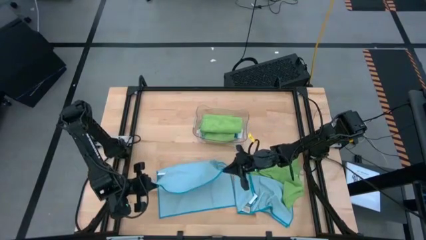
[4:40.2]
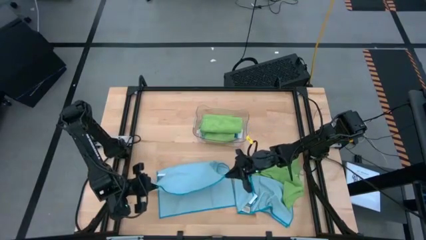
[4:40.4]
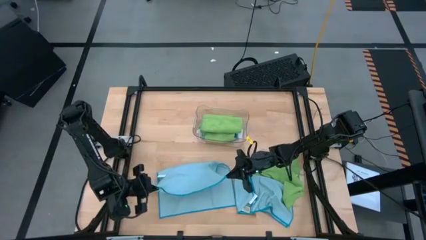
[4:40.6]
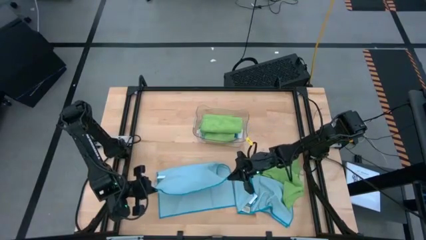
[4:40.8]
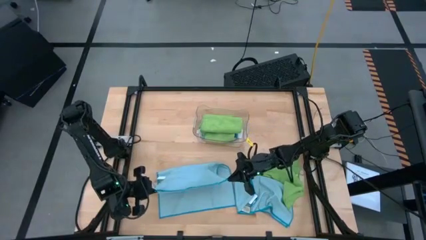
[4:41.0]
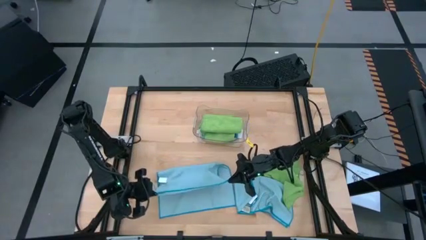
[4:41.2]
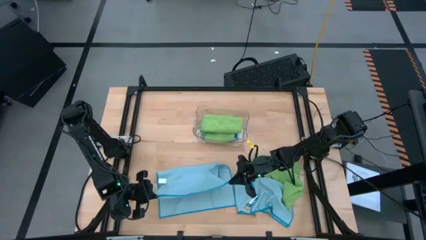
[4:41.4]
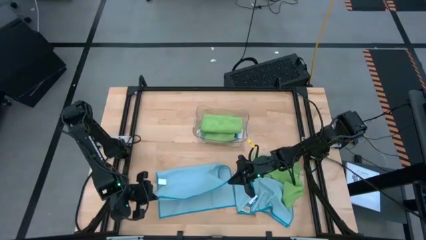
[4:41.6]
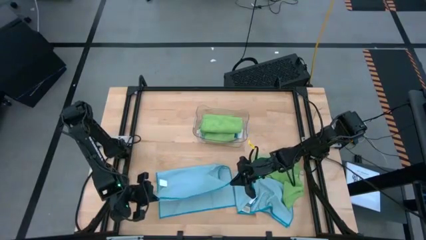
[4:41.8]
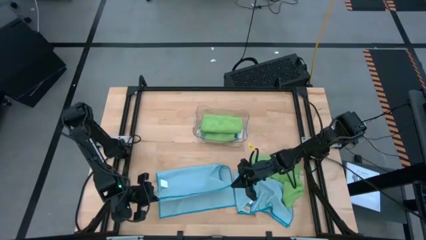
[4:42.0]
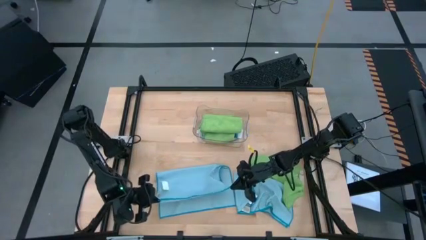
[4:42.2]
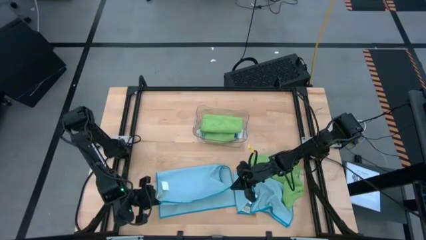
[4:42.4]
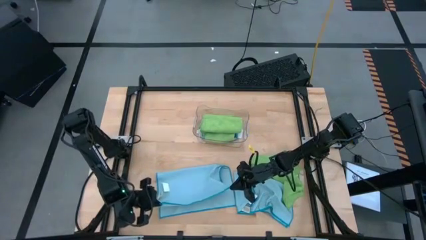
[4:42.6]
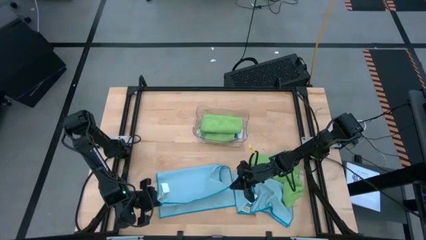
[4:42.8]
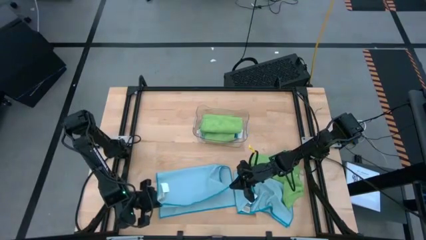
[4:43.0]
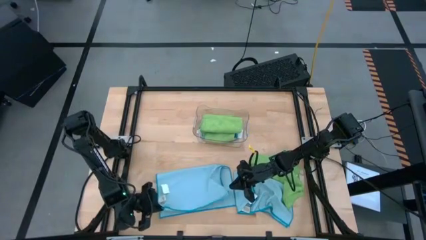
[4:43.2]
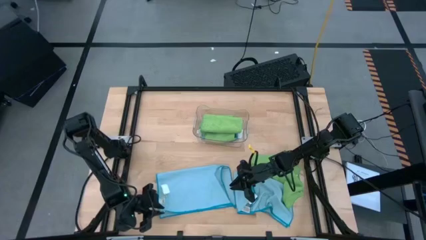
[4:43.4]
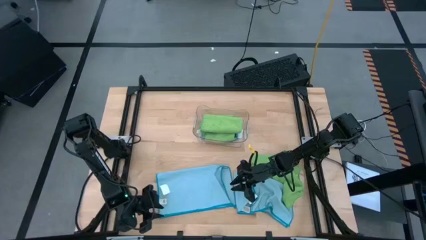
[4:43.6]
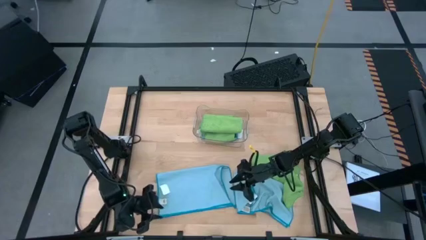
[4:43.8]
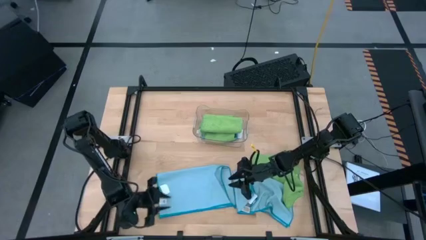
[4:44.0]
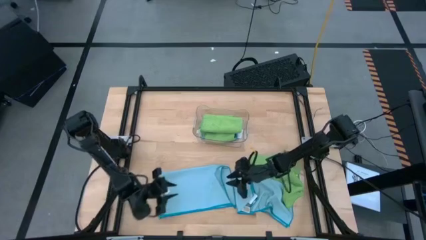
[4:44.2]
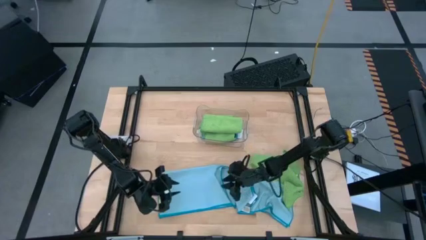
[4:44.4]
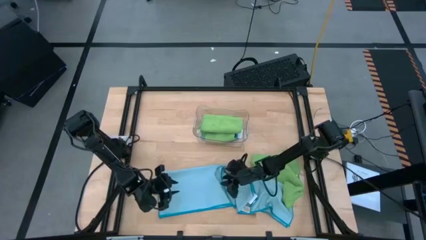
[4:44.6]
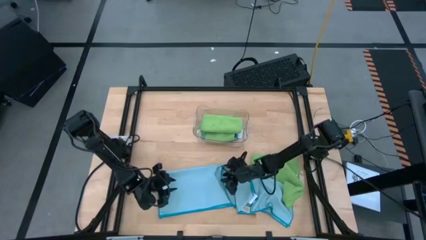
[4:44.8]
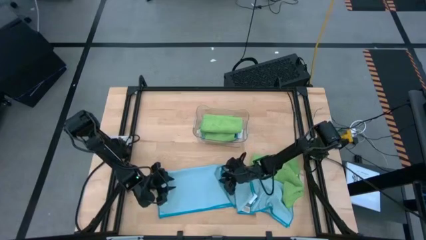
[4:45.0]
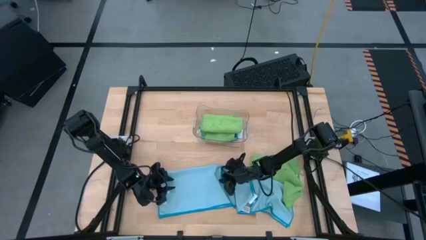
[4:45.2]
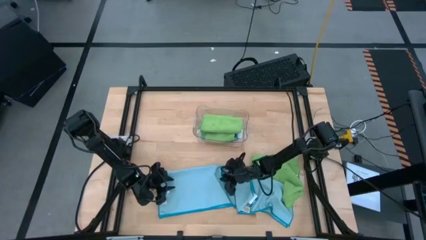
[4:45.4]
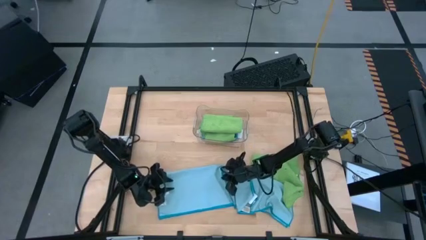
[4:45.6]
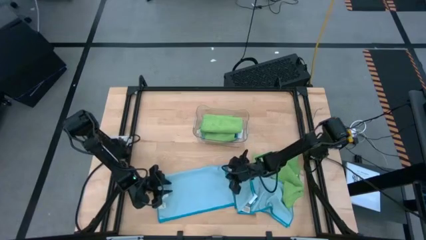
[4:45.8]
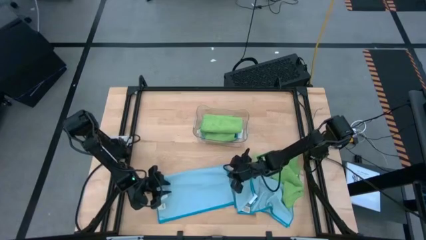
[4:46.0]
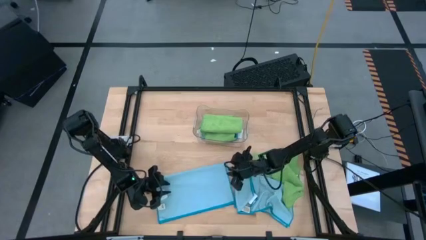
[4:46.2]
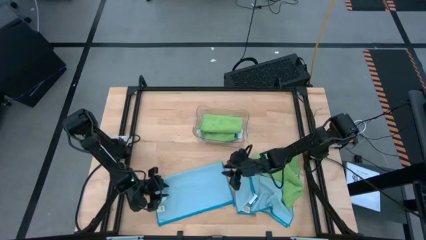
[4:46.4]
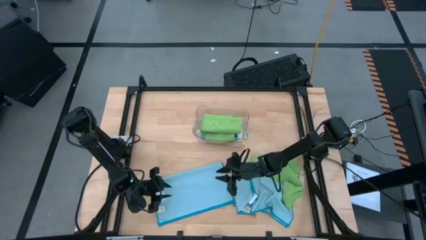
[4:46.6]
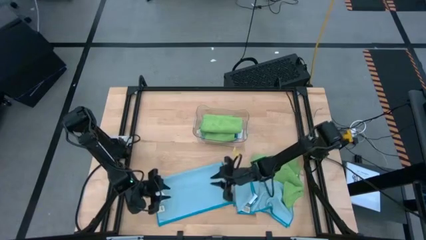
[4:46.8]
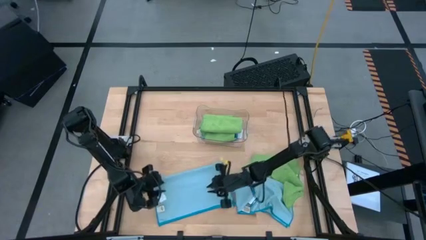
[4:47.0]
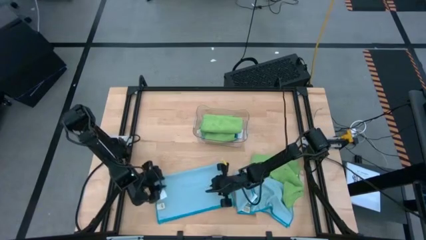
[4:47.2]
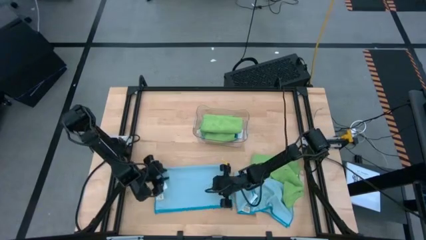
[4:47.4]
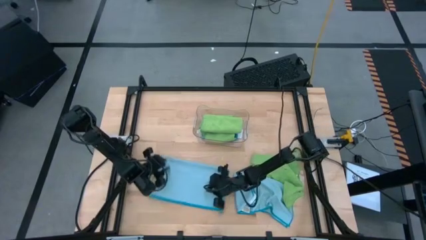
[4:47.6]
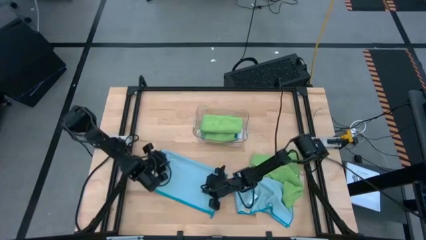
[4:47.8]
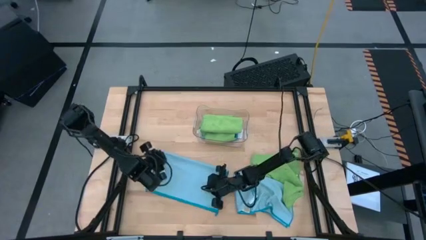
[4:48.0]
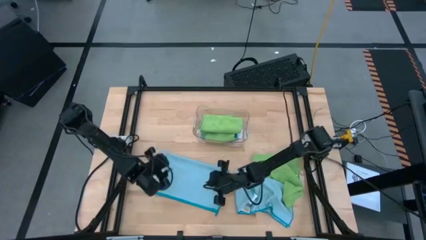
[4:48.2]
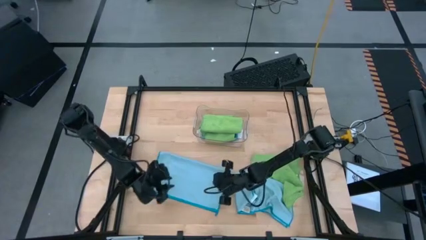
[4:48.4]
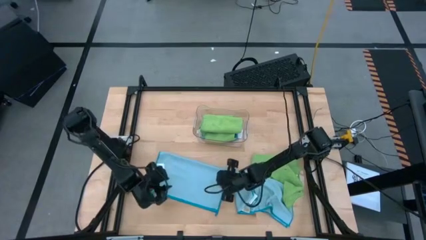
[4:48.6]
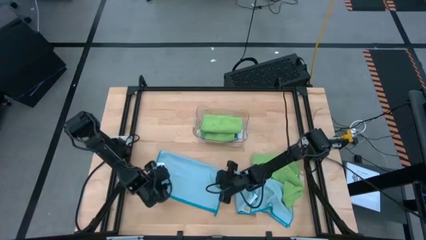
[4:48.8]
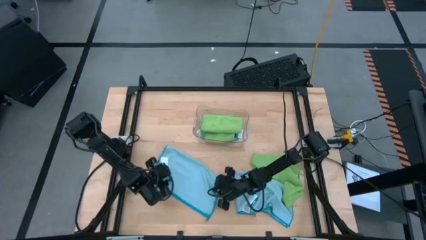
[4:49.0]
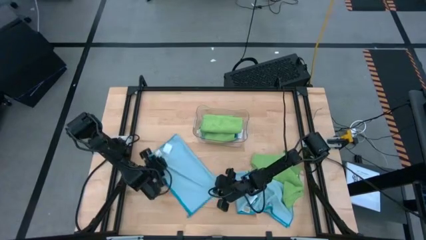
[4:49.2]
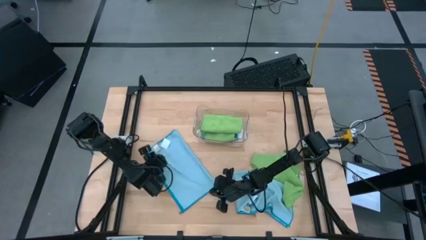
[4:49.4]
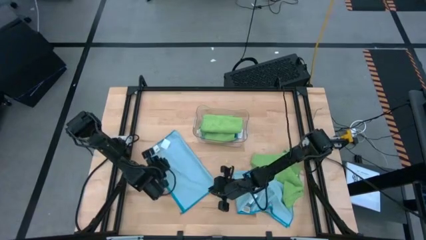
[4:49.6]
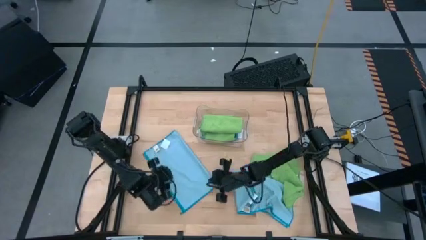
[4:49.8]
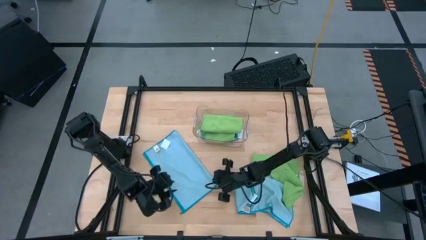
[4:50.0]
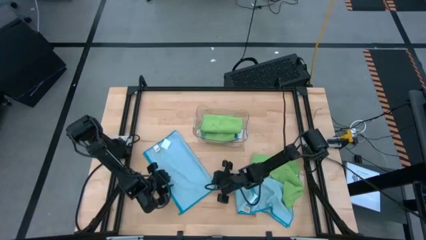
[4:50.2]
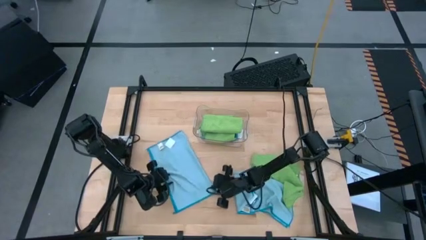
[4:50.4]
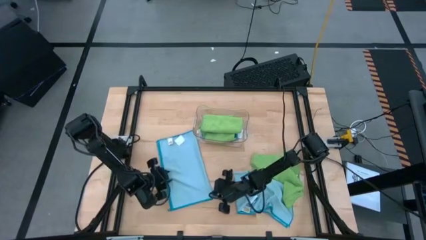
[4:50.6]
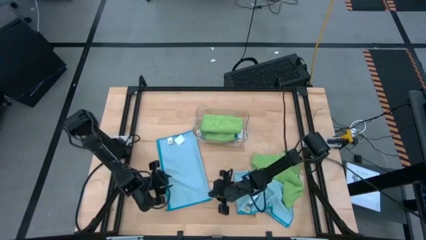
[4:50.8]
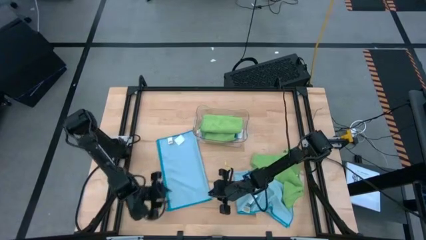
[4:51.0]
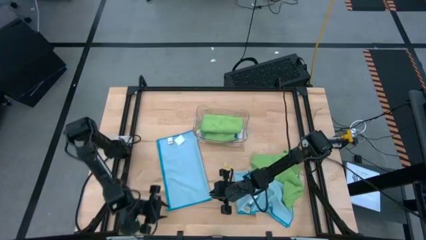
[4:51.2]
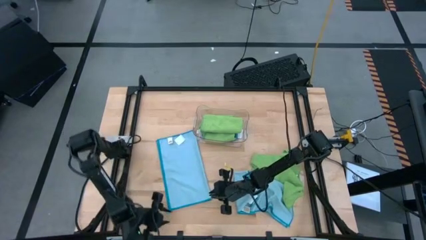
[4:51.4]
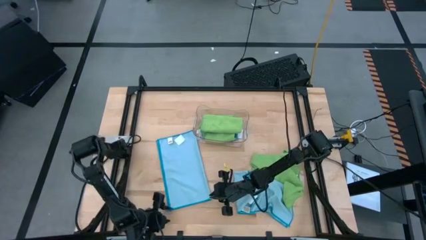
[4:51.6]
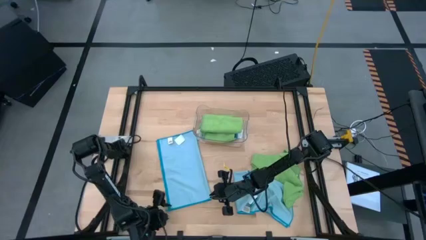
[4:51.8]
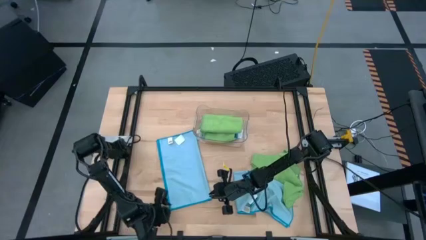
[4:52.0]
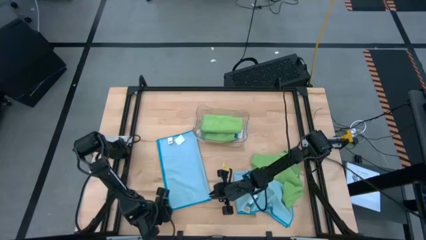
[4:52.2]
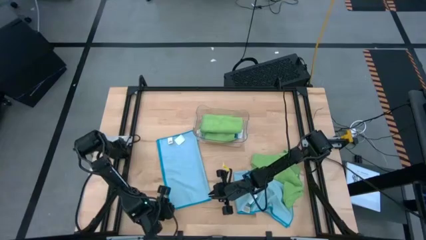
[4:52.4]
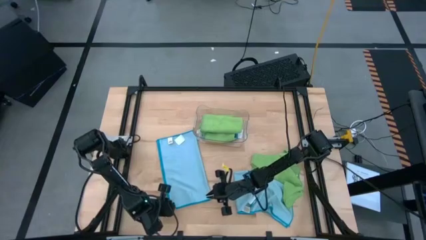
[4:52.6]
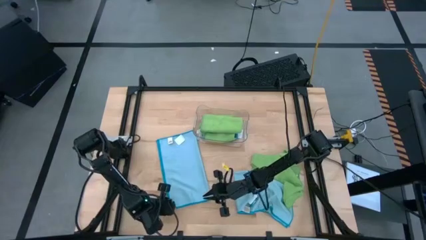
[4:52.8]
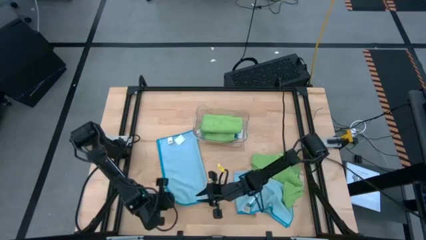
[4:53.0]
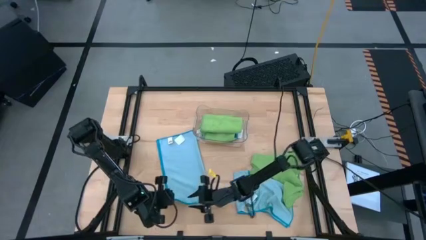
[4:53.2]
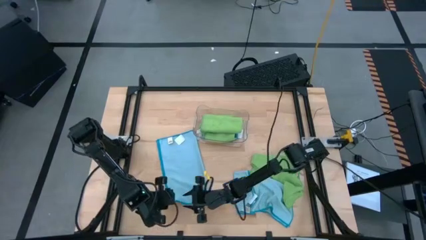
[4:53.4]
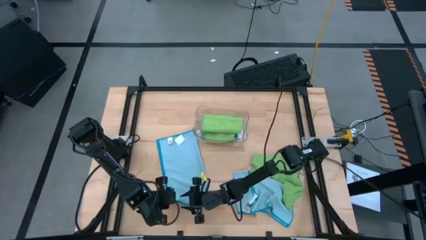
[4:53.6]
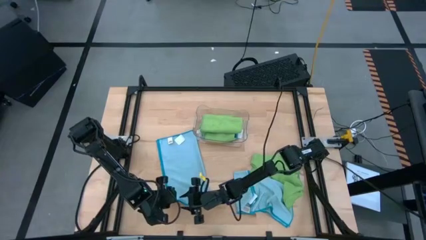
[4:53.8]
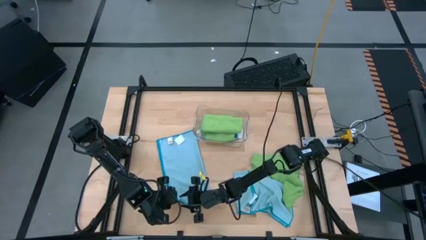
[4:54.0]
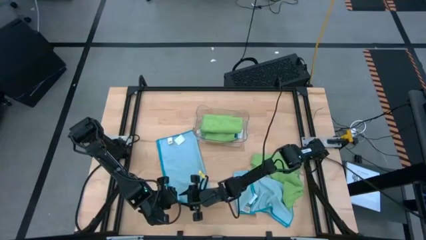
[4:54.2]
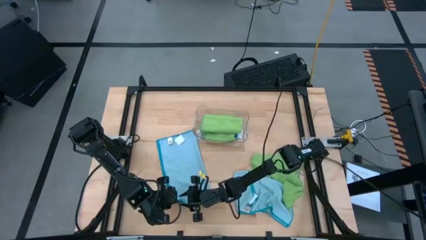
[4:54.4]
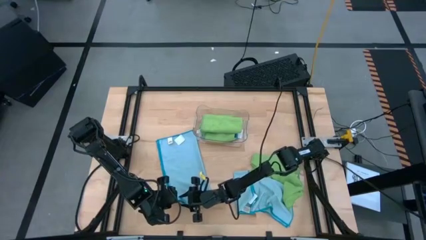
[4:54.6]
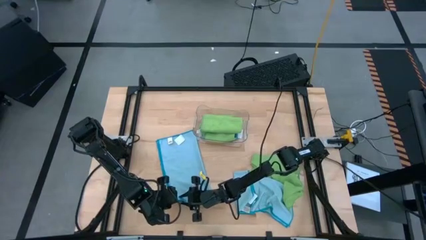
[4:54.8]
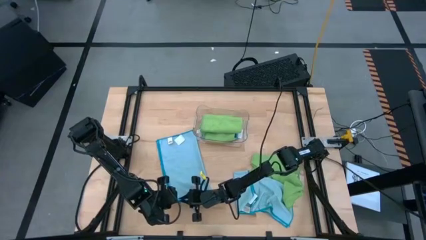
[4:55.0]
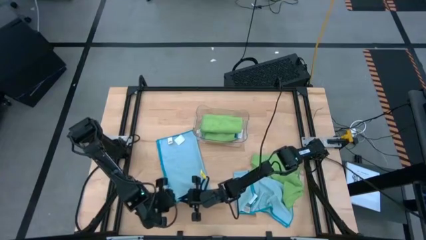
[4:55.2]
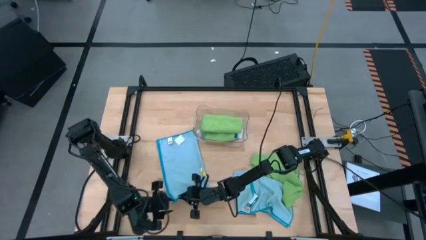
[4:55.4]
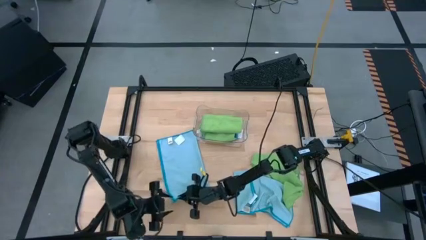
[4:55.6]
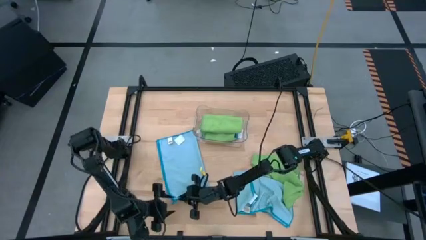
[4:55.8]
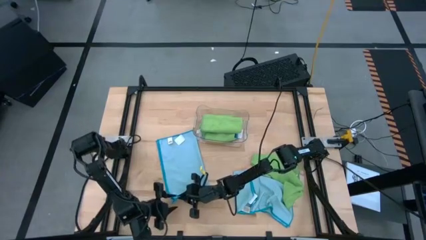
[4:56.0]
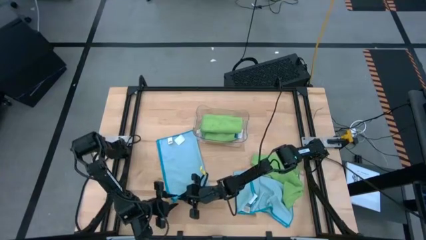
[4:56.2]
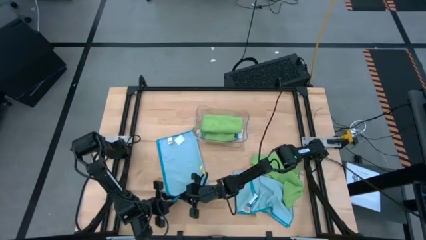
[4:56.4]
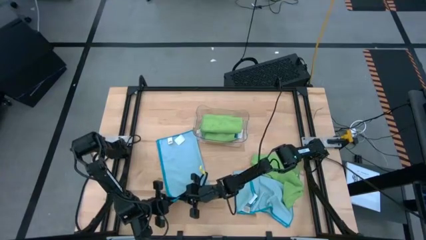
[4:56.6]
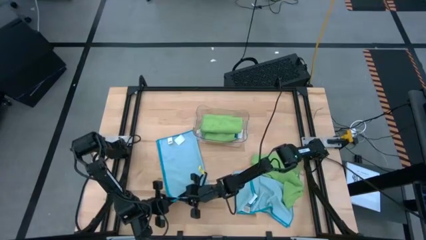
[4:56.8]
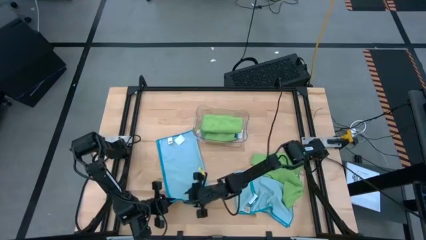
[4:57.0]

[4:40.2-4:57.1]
Task: Fold microfiber towels
Fold the blue left microfiber cloth
